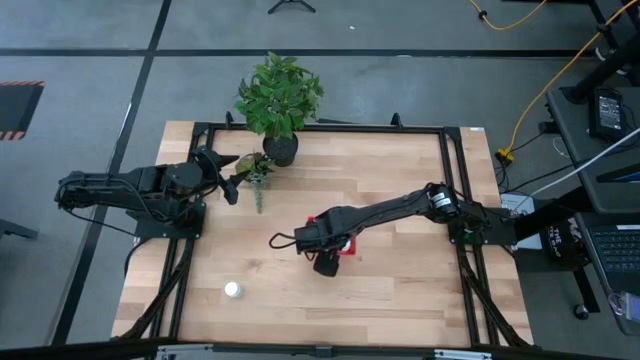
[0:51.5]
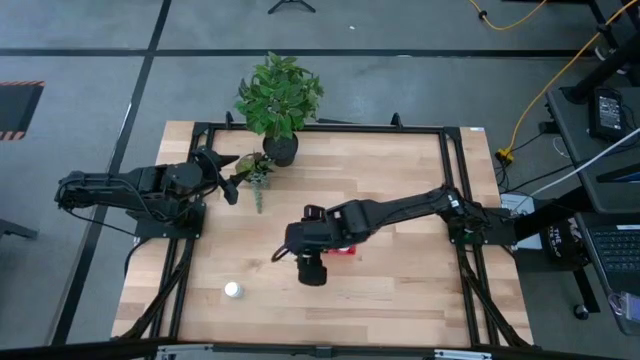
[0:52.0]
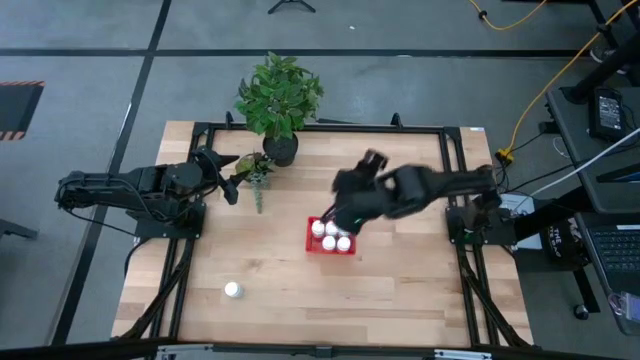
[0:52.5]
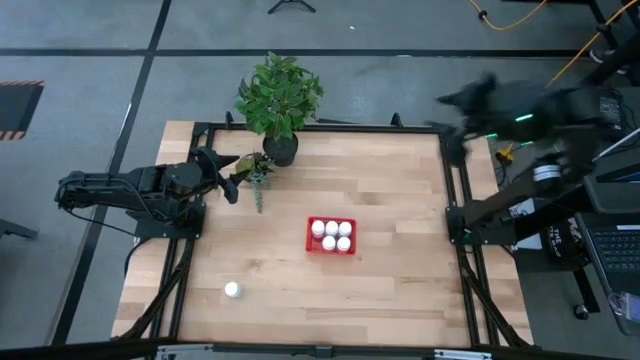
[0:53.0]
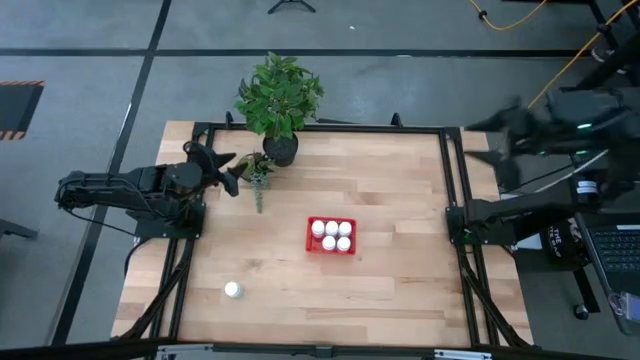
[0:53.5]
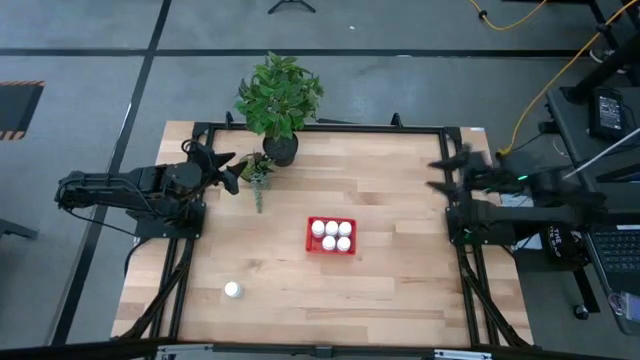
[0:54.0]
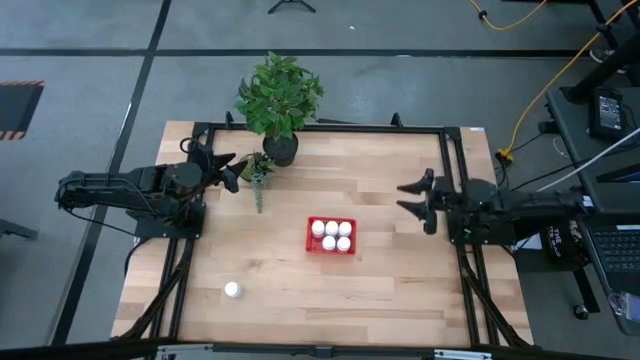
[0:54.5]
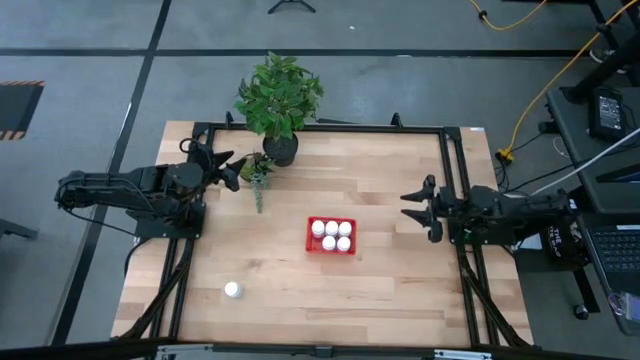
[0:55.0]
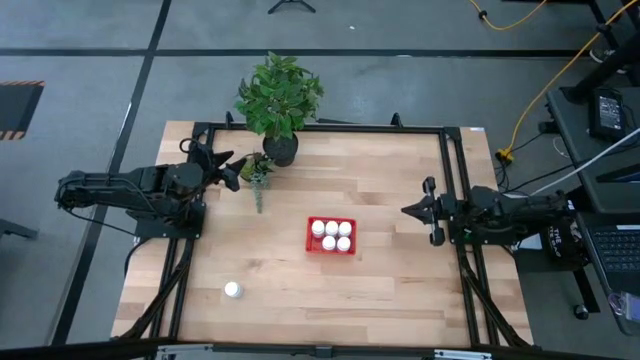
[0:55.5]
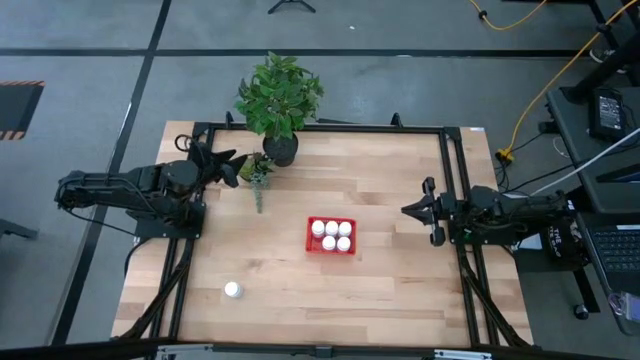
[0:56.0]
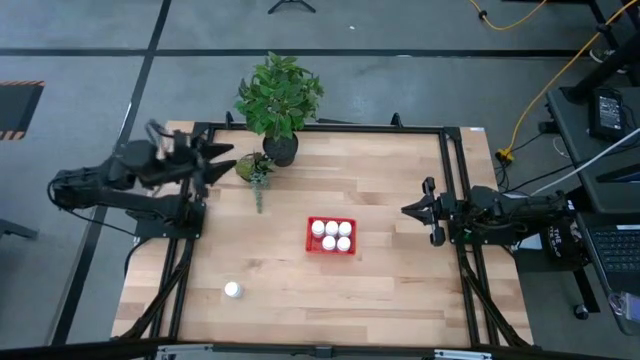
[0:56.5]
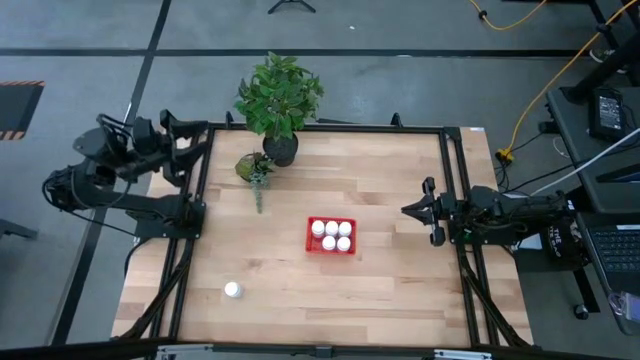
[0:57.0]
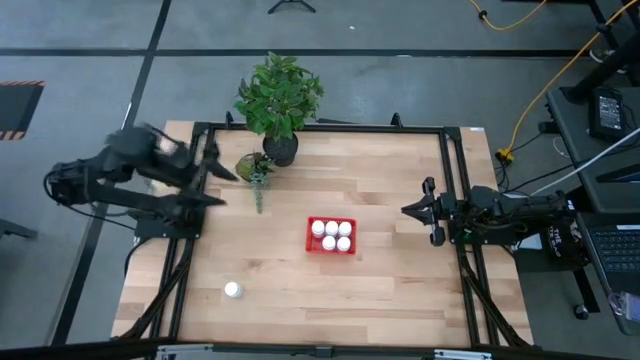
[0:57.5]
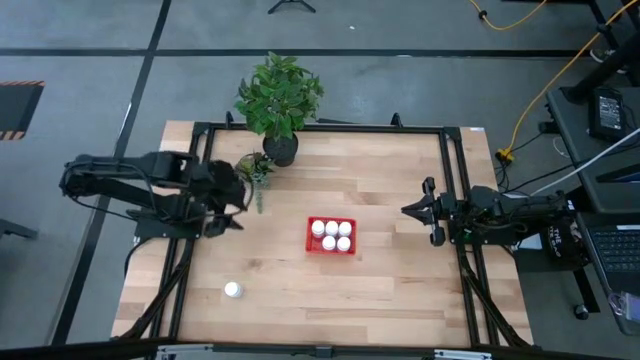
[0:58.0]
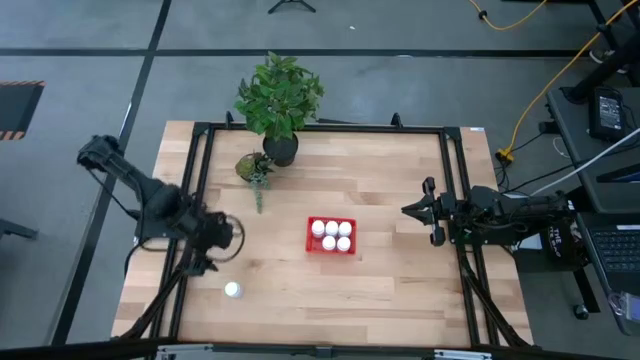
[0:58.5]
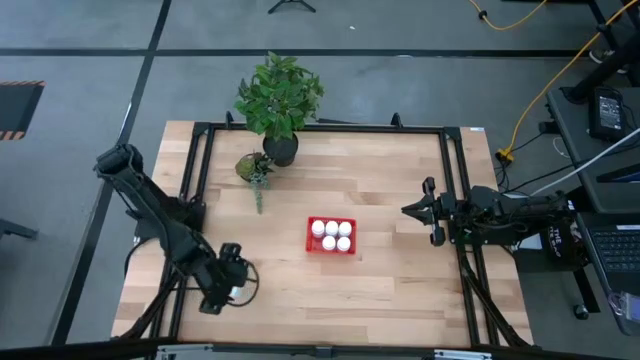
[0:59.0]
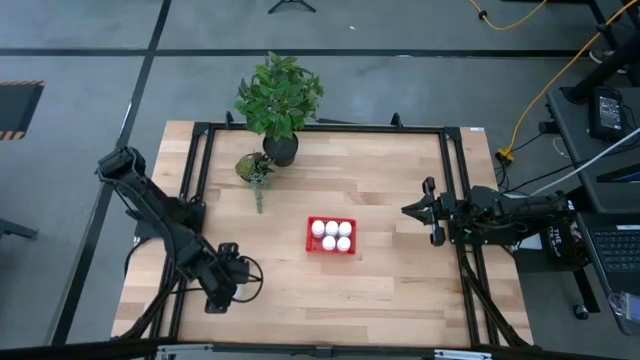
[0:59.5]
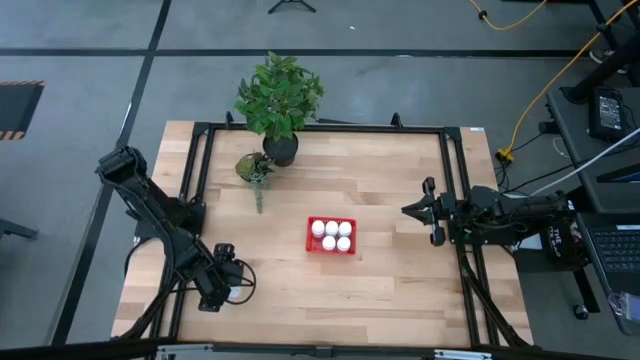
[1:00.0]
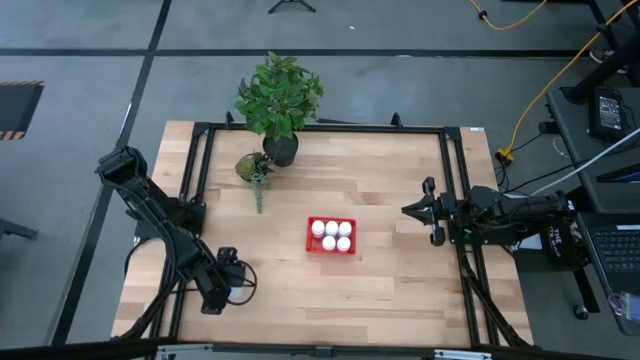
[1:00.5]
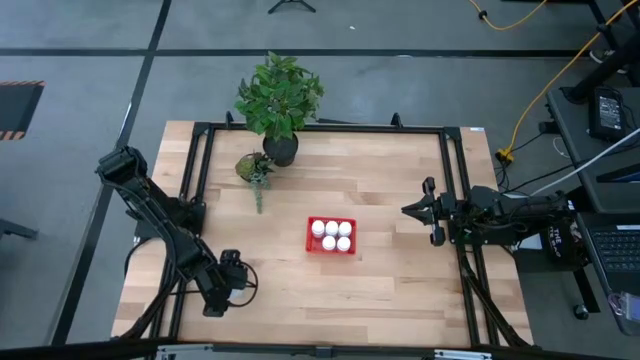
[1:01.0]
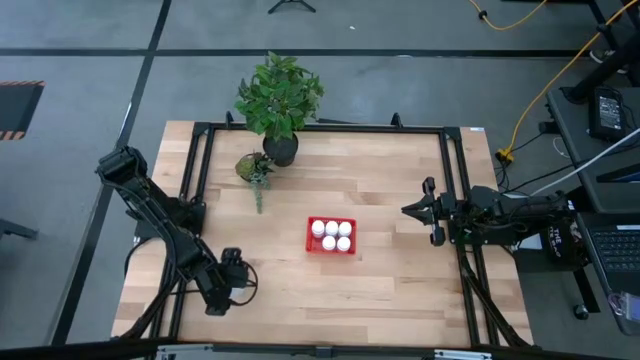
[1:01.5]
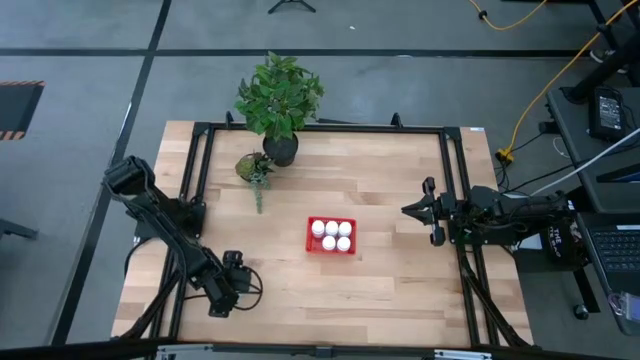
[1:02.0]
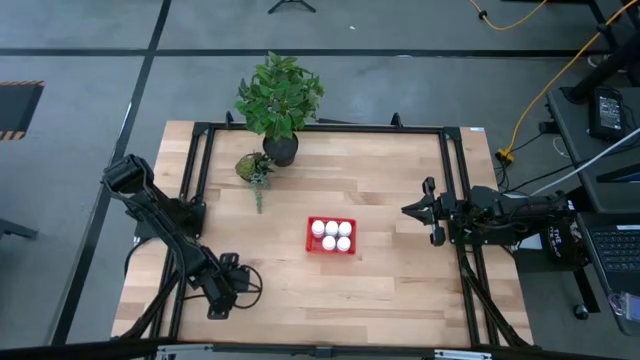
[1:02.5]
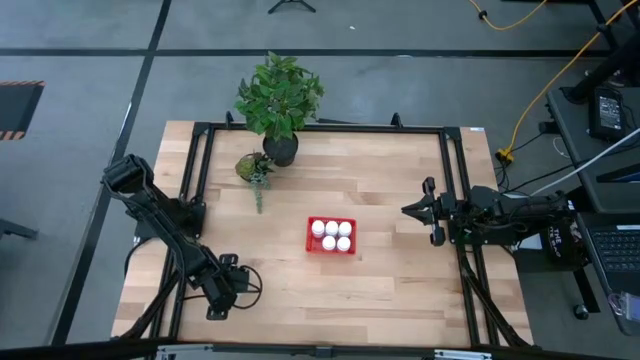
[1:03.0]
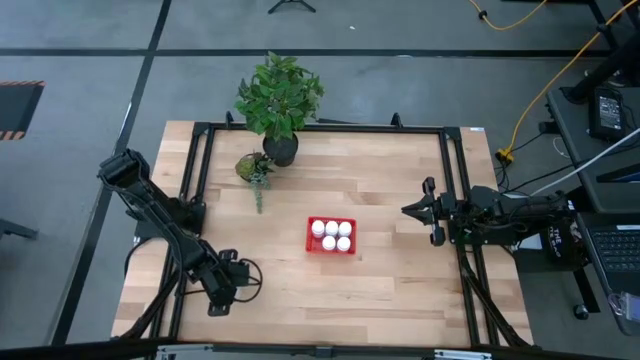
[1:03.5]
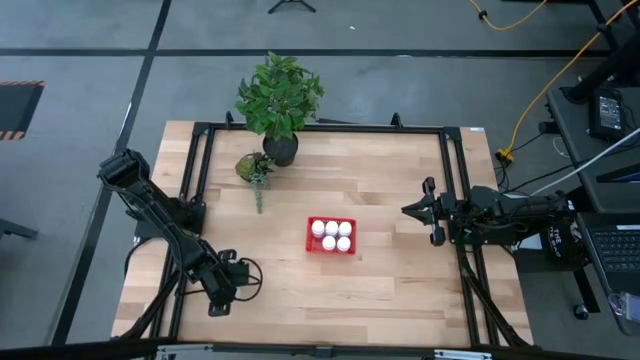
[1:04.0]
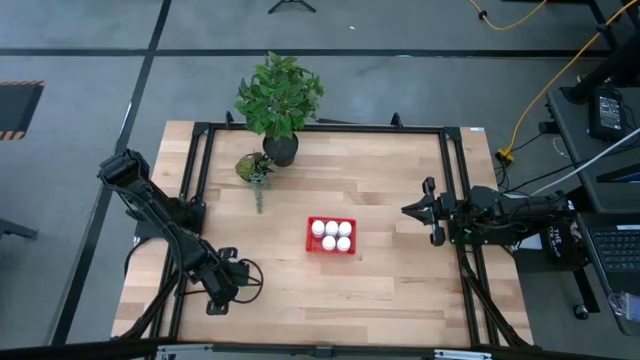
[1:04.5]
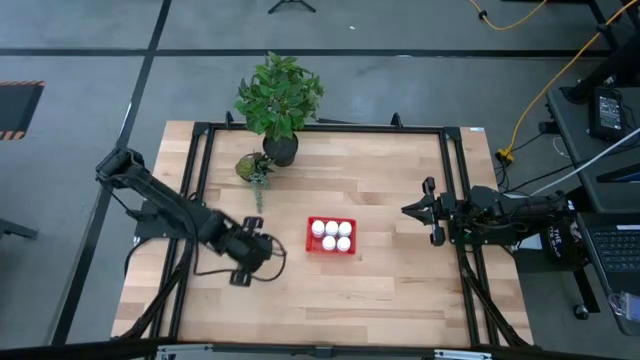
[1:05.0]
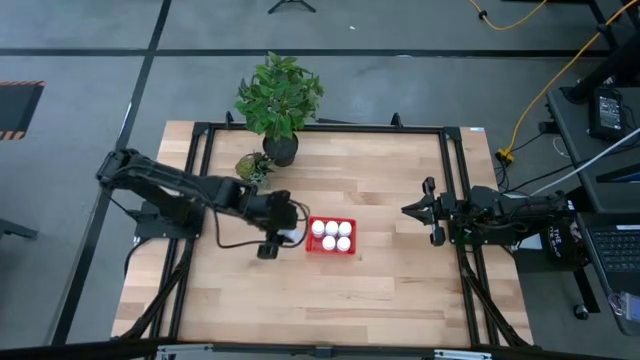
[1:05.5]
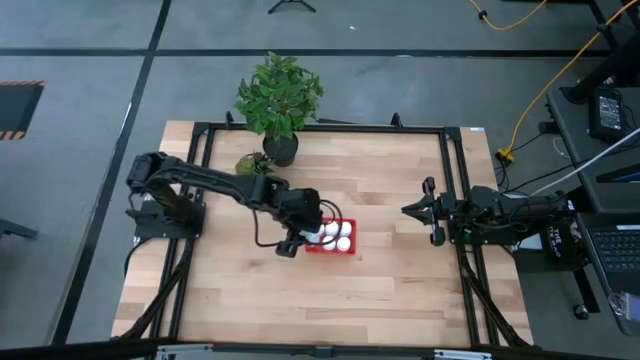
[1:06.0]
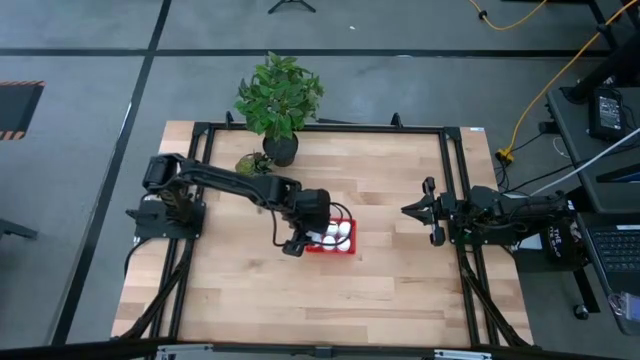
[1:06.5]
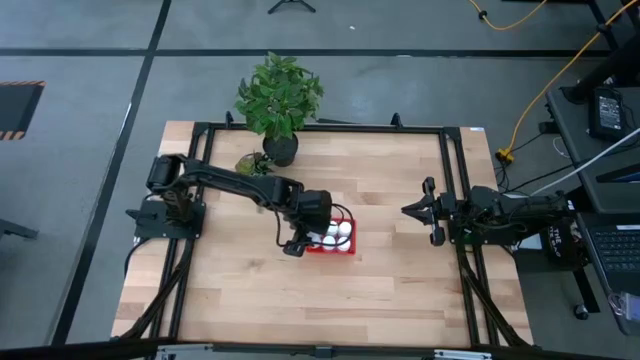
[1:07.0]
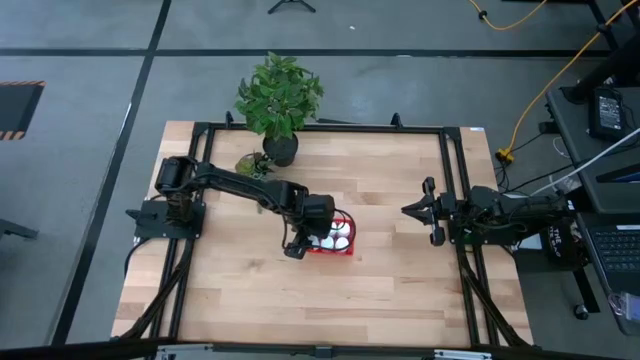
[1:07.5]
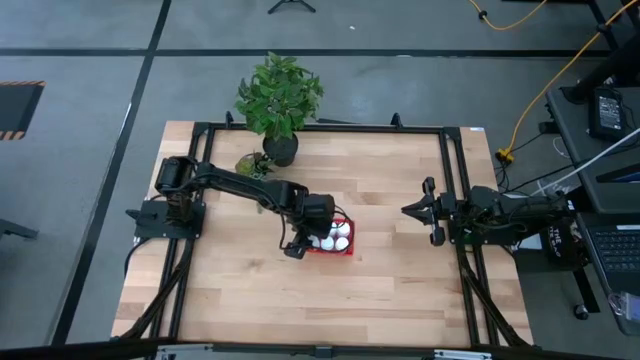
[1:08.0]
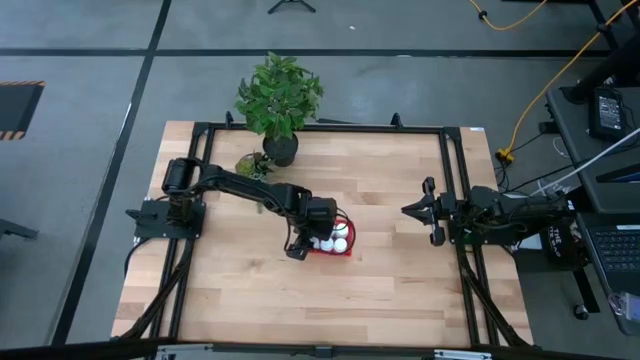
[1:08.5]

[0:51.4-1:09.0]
Task: Pick and place pill bottles into a basket
Put the white medicine bottle into the red basket
